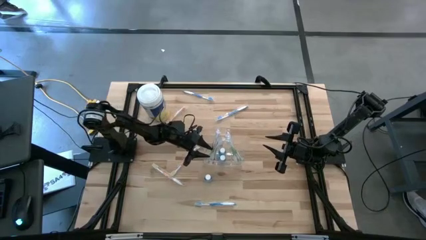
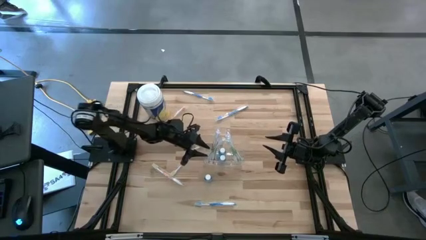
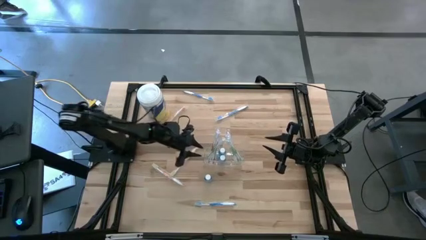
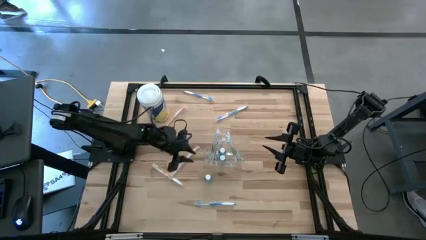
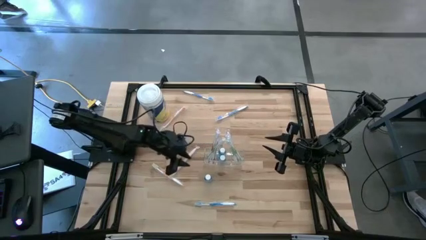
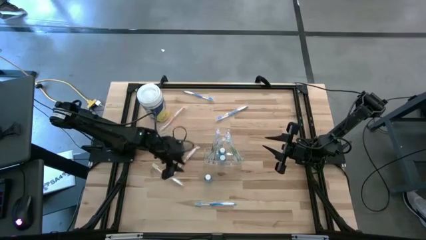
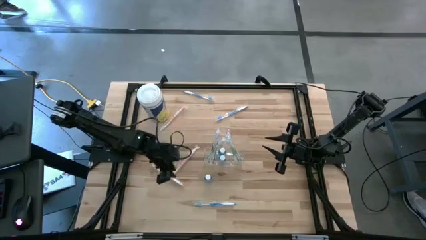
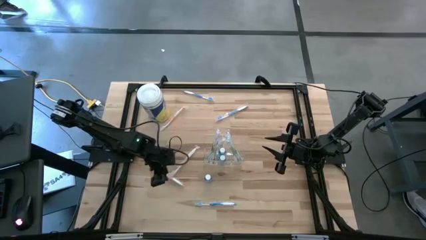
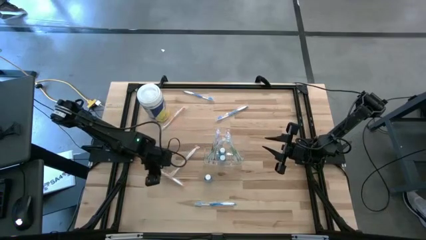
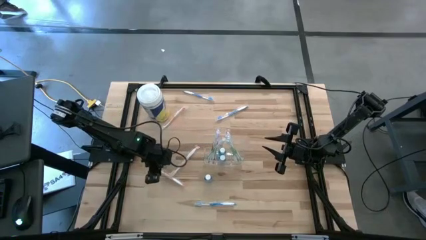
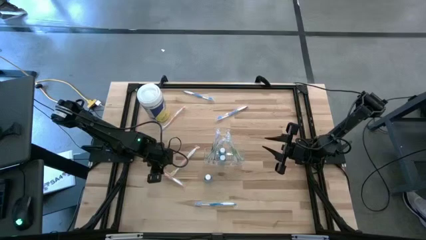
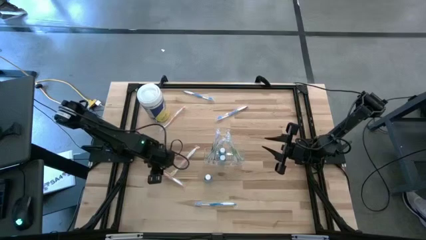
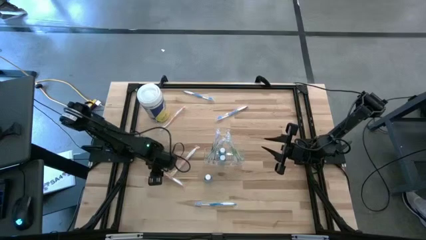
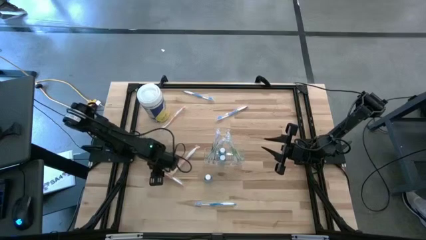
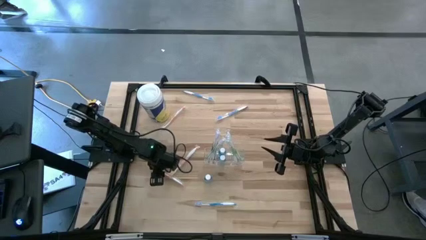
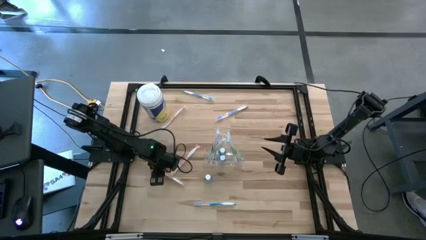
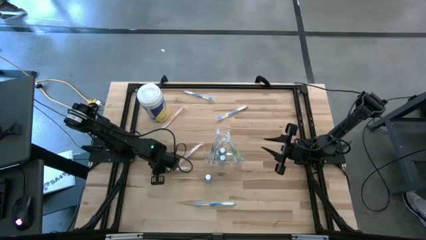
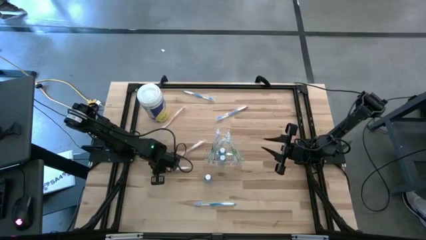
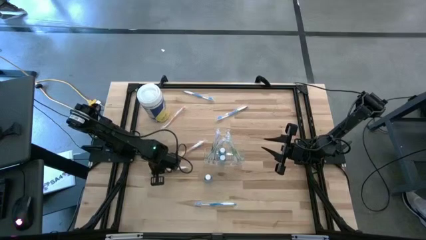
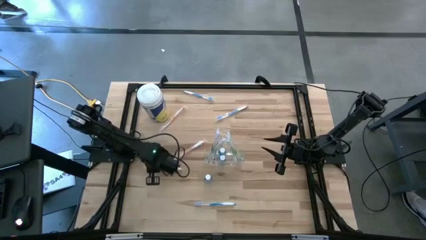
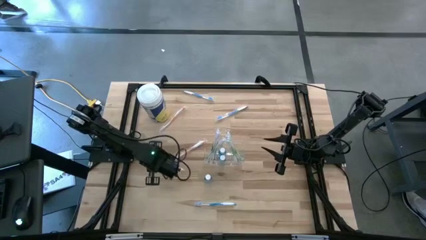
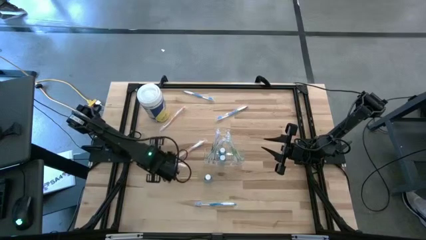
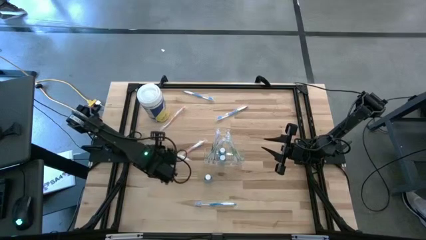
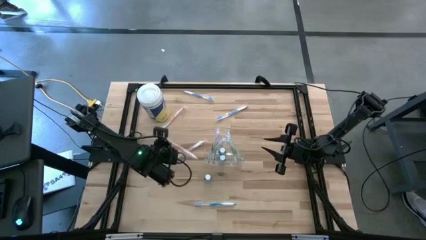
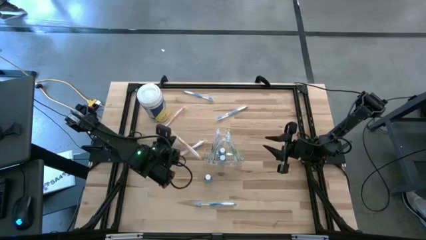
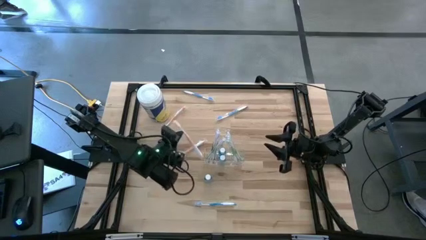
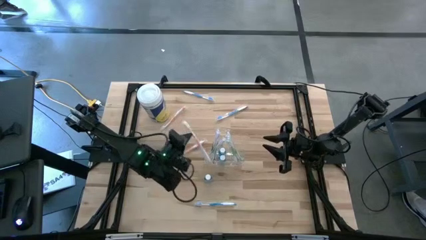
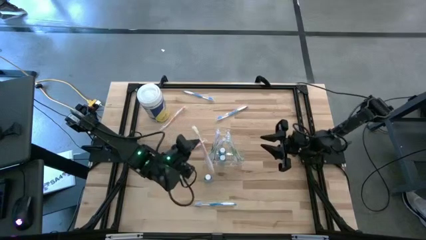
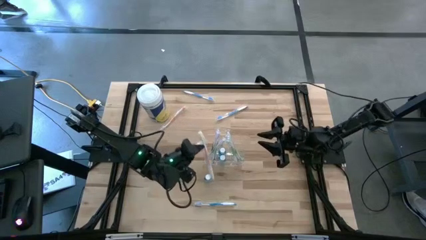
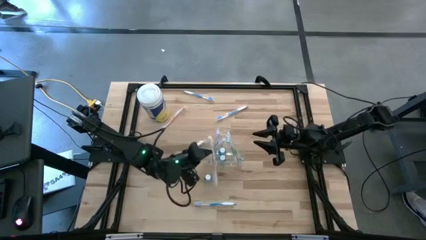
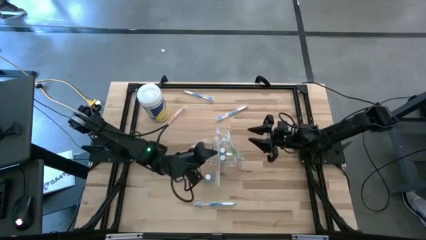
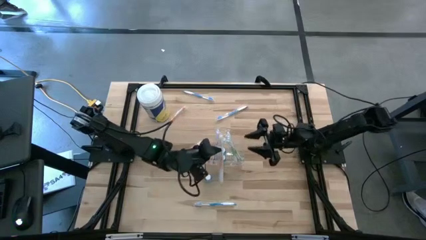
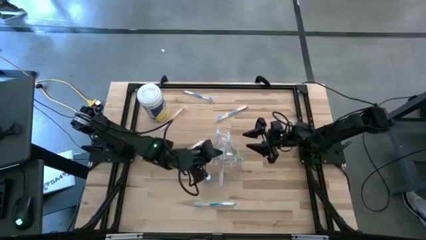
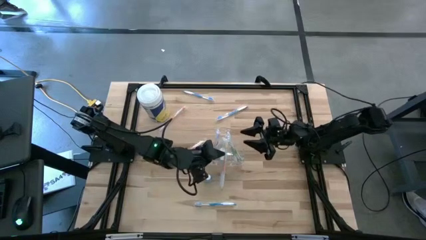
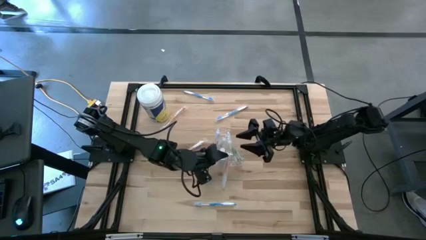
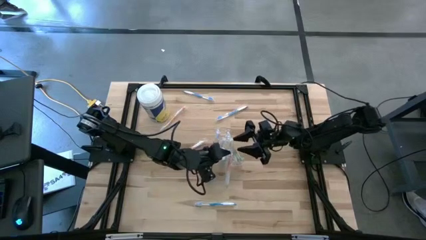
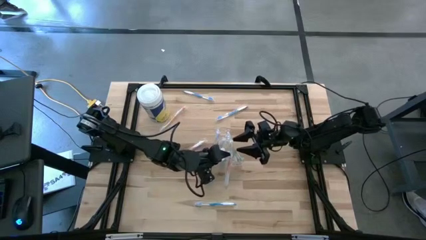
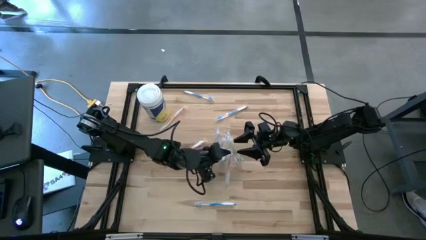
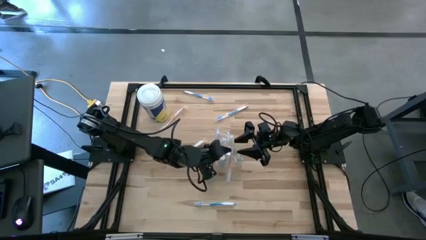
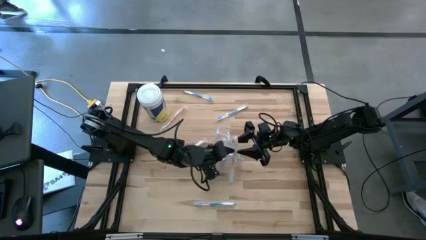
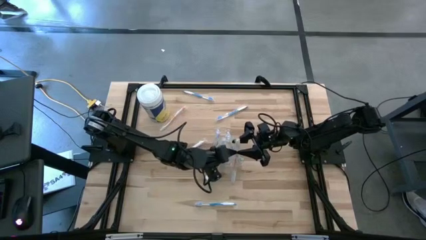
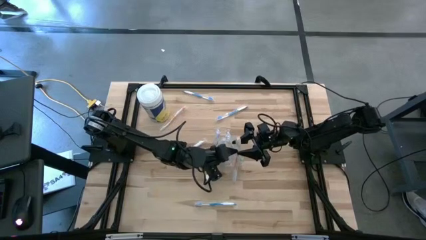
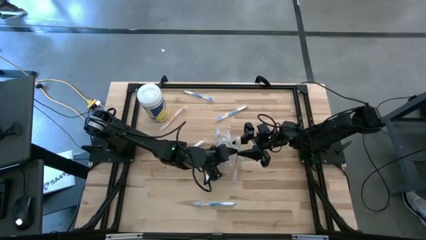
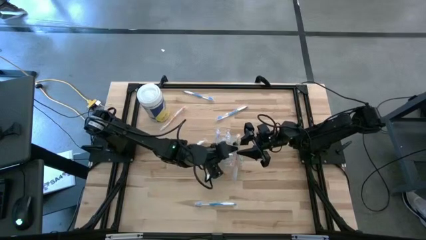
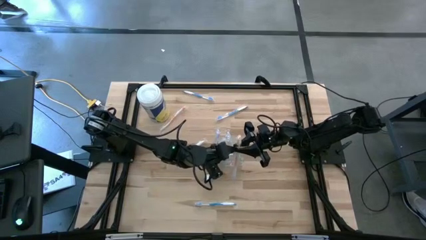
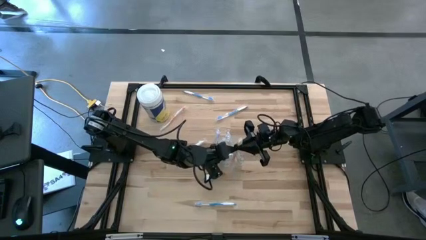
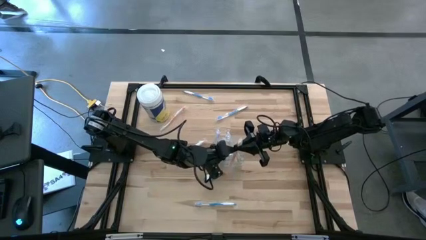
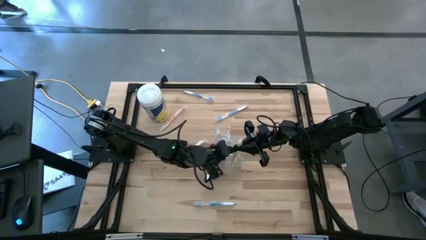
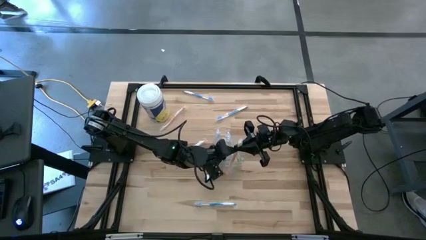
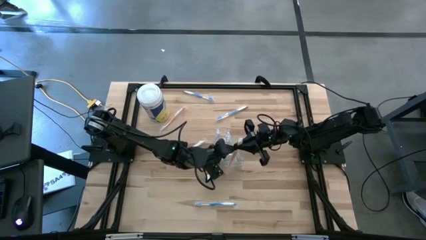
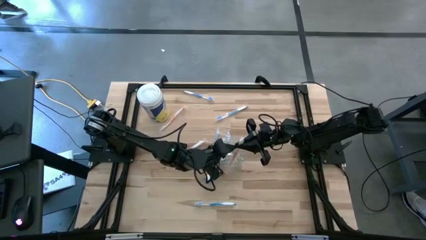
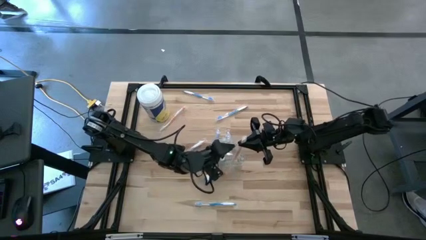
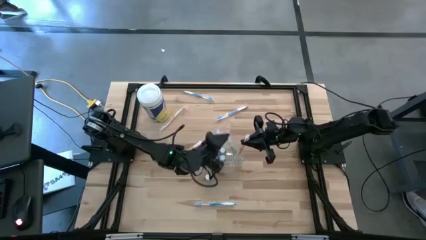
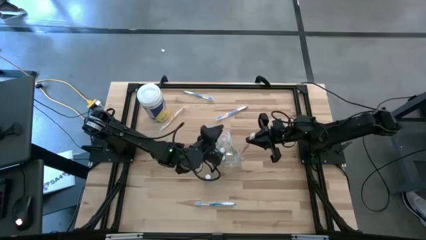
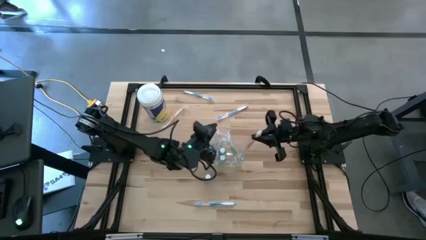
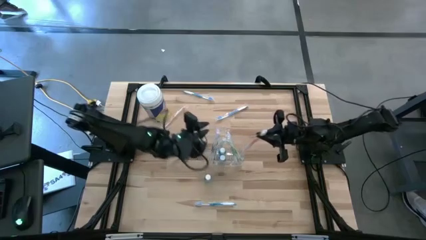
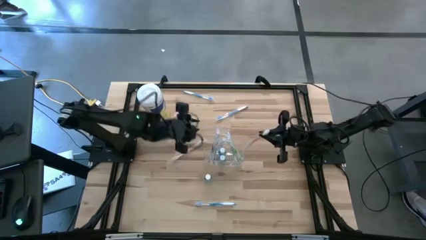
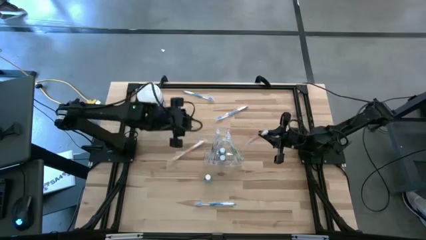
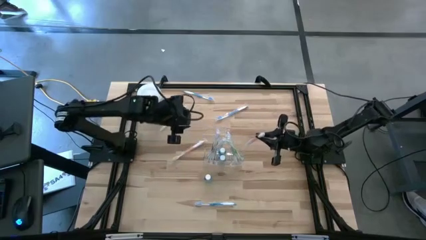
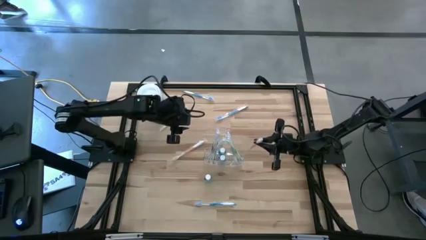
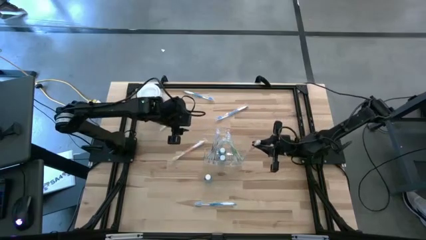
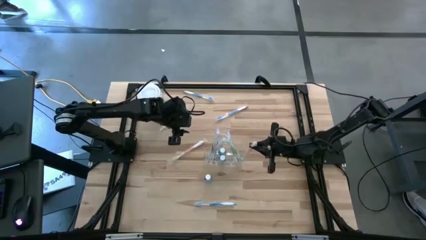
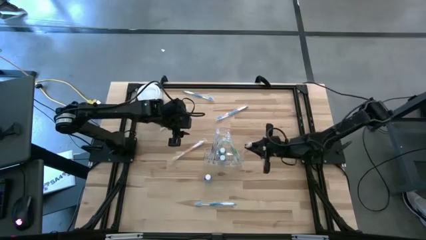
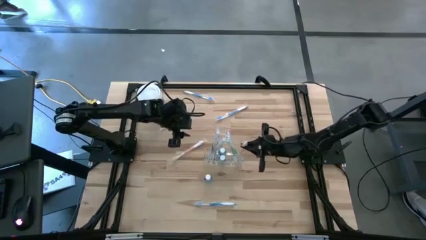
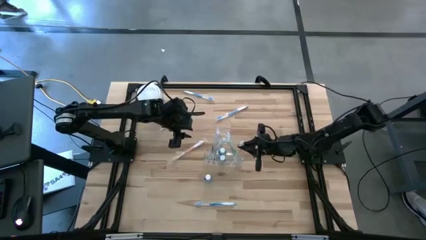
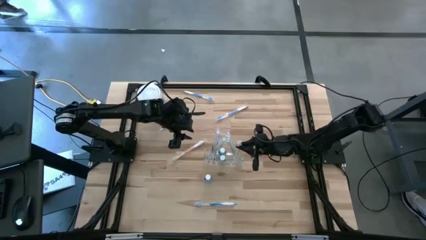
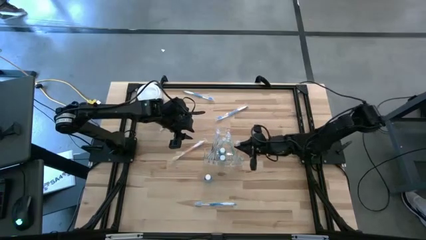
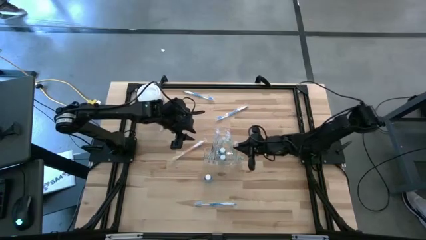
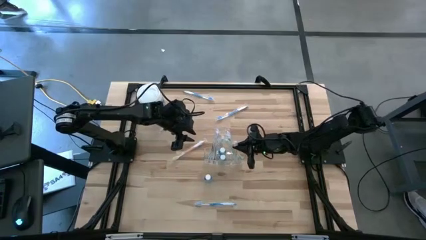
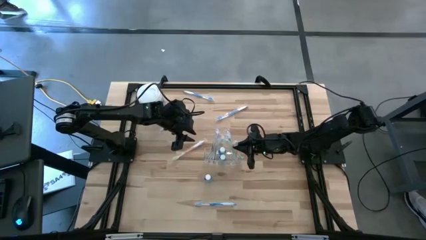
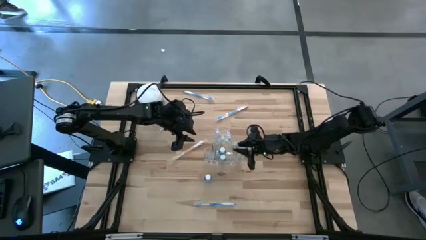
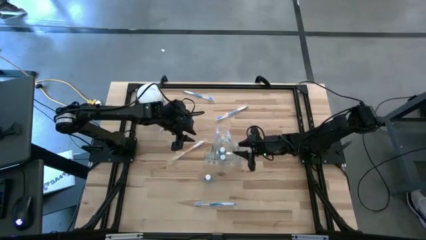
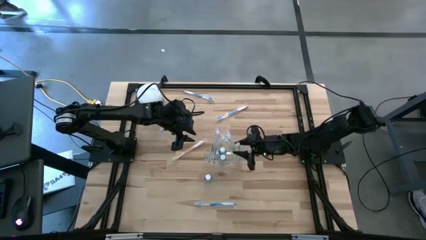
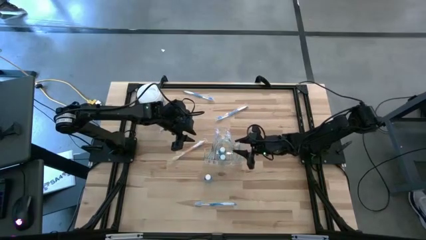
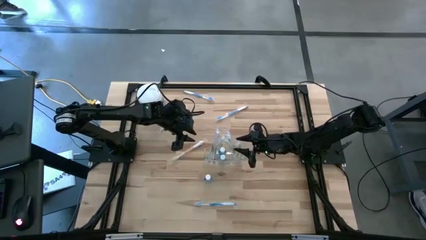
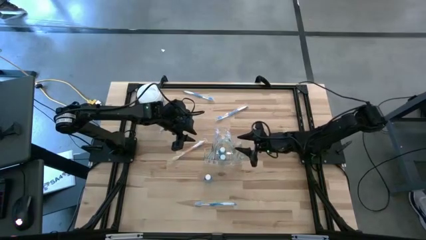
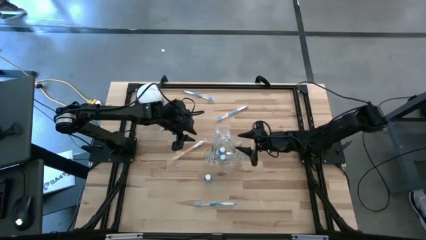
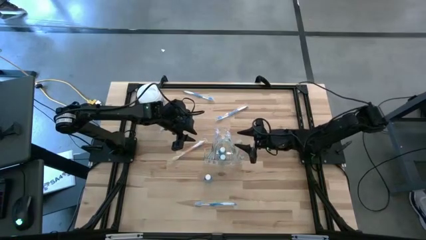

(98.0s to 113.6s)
Task: Pick & Place toothbrushing station
Put the bottom orange toothbrush into the transparent organizer

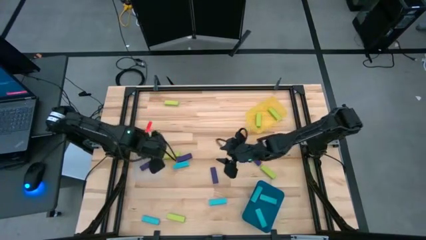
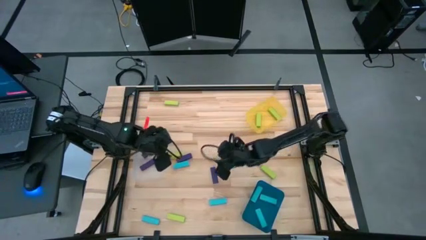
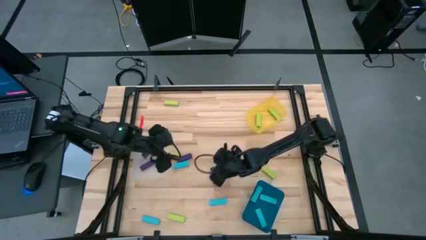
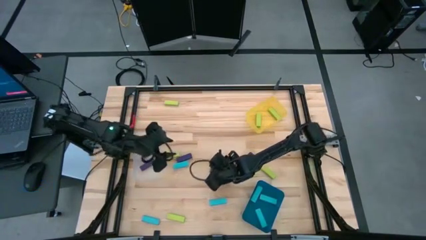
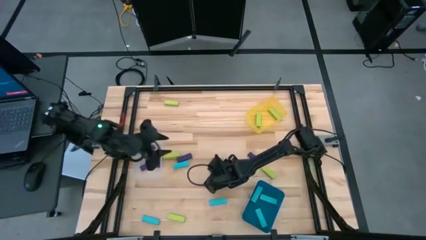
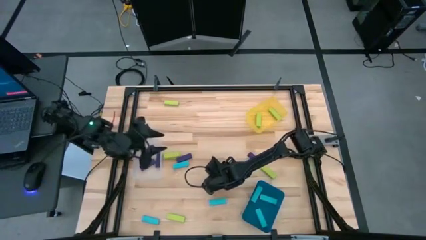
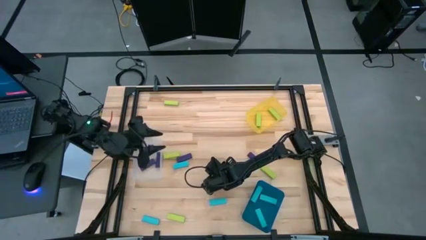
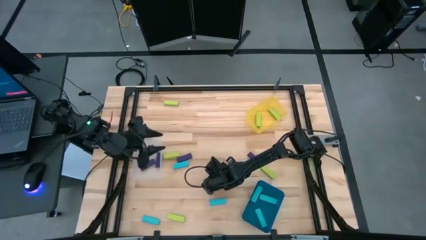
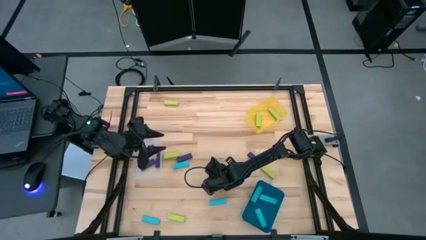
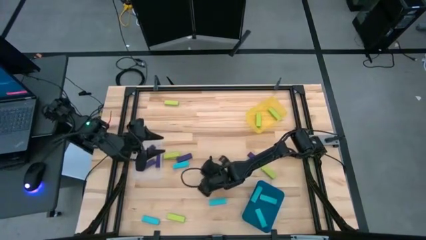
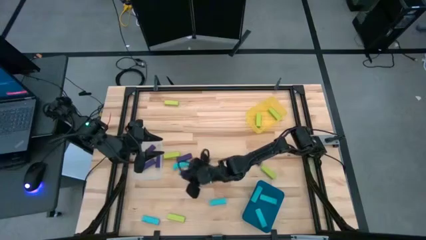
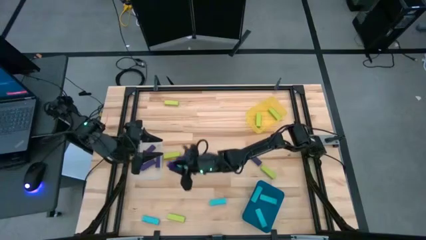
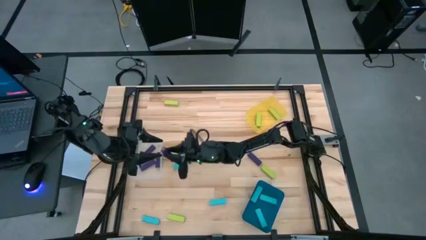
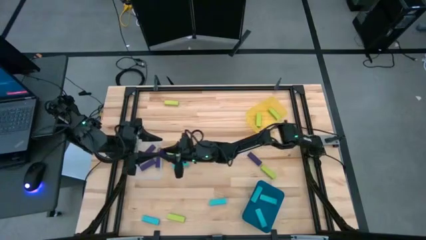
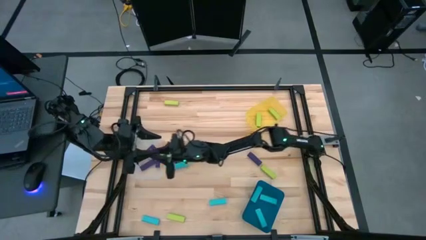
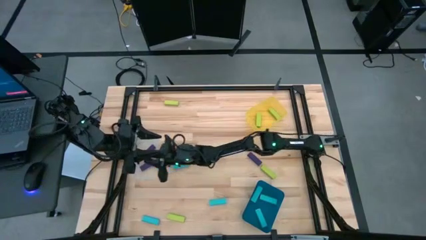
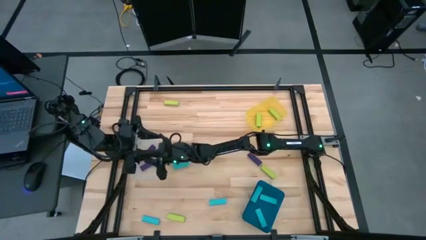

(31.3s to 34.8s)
Task: Sort blocks
Put the violet block into the transparent bin
